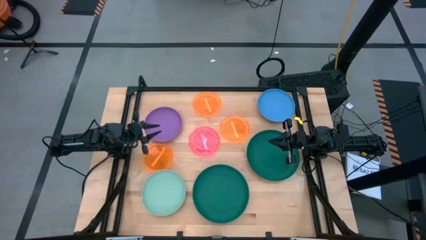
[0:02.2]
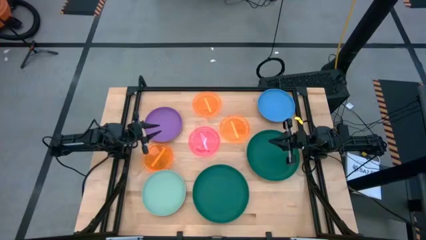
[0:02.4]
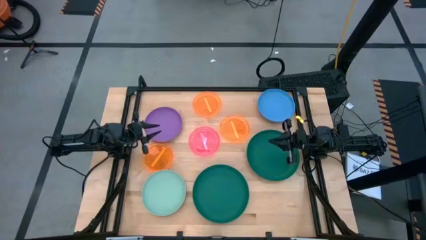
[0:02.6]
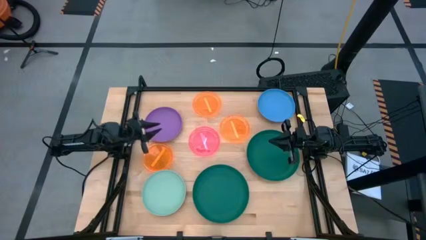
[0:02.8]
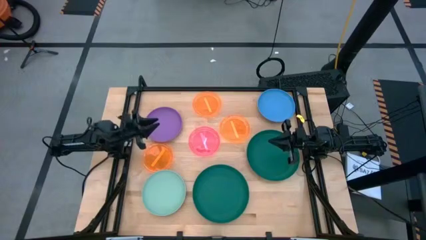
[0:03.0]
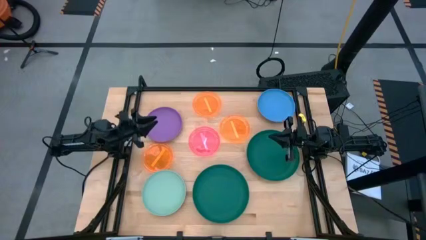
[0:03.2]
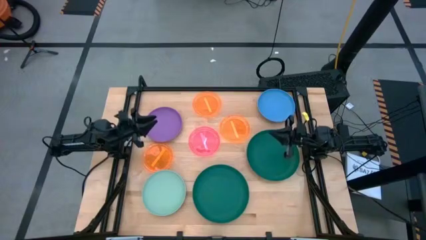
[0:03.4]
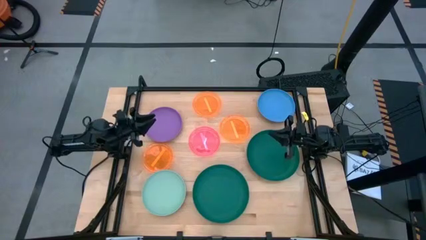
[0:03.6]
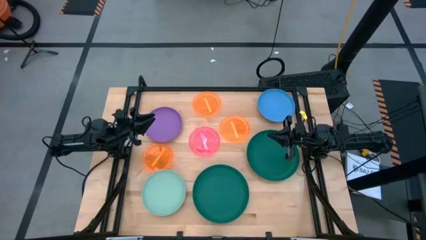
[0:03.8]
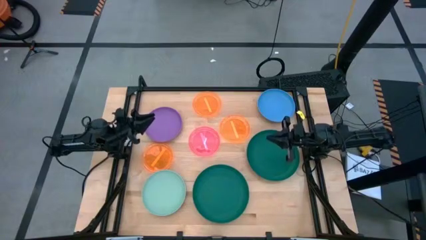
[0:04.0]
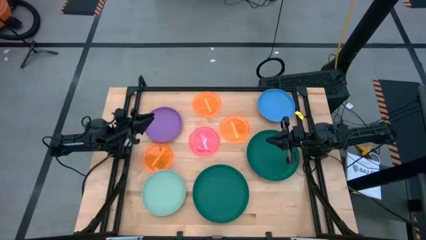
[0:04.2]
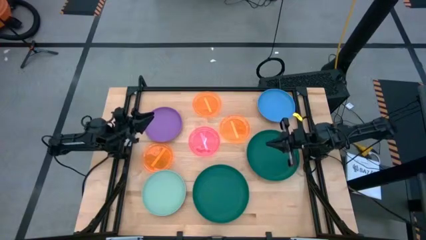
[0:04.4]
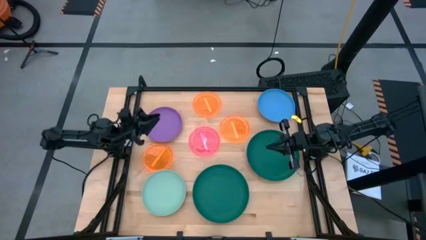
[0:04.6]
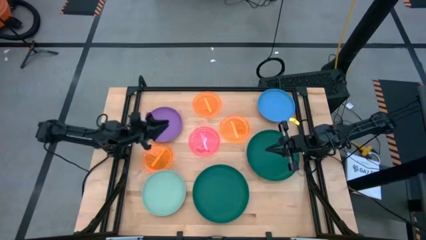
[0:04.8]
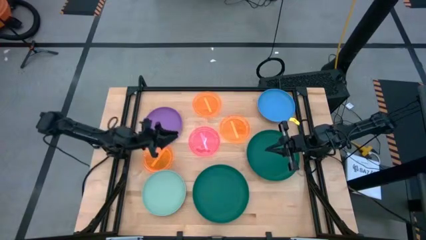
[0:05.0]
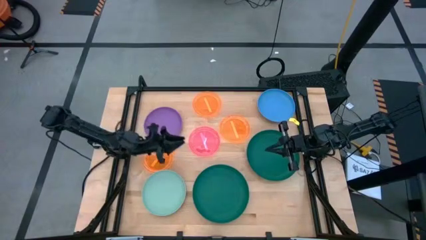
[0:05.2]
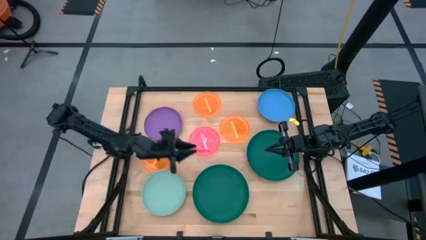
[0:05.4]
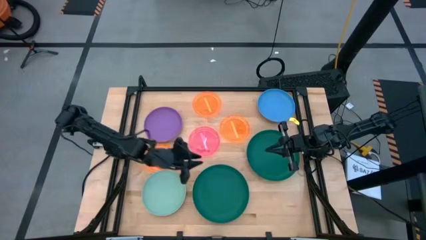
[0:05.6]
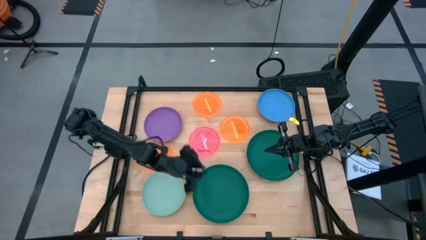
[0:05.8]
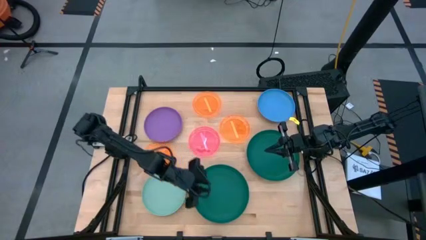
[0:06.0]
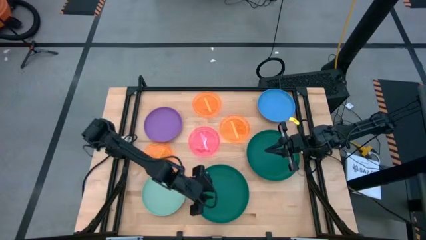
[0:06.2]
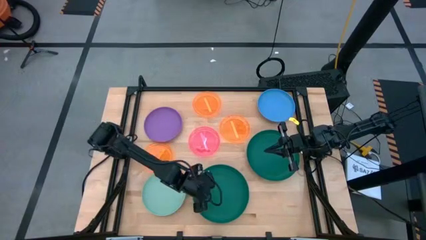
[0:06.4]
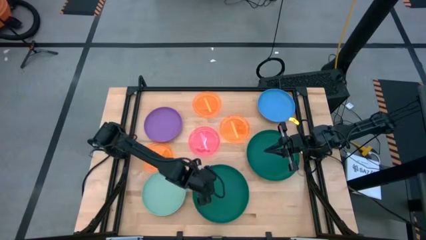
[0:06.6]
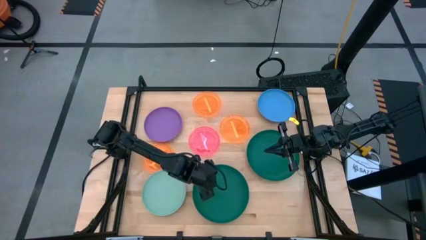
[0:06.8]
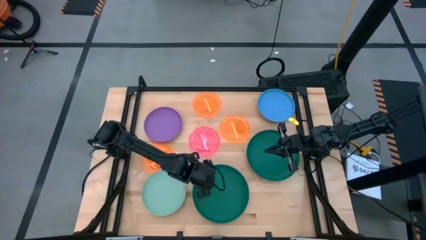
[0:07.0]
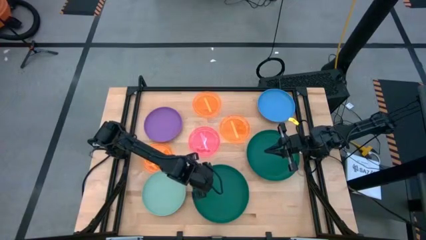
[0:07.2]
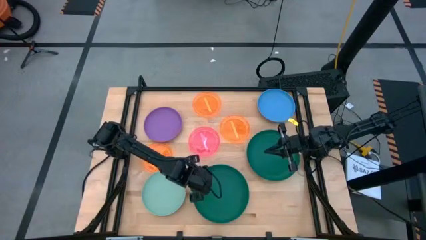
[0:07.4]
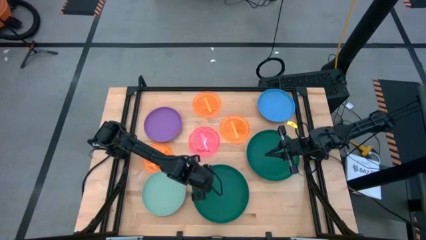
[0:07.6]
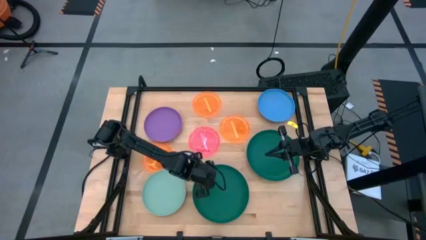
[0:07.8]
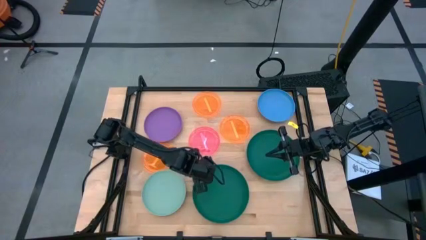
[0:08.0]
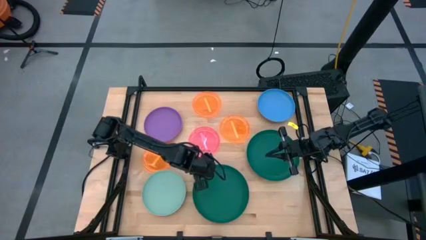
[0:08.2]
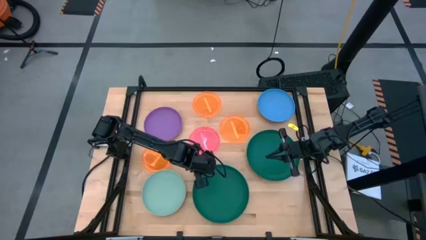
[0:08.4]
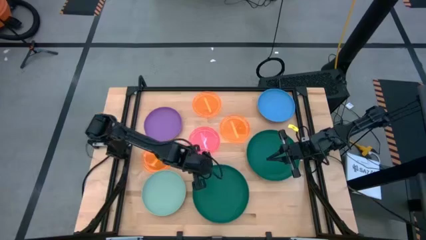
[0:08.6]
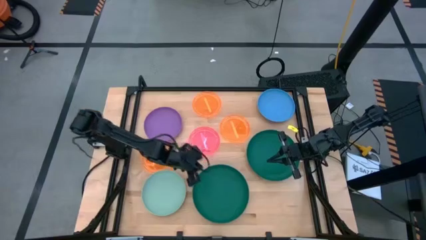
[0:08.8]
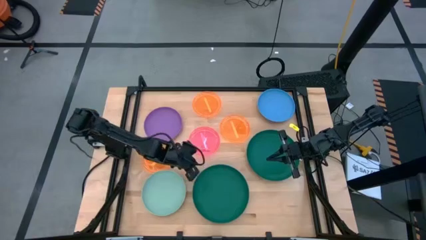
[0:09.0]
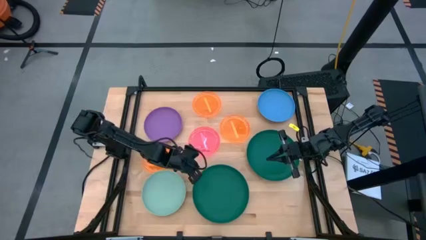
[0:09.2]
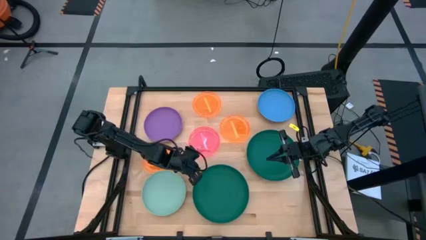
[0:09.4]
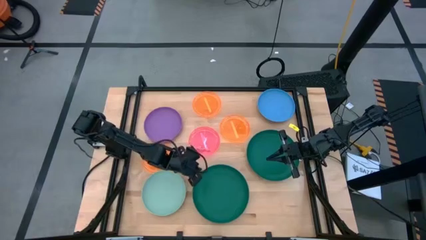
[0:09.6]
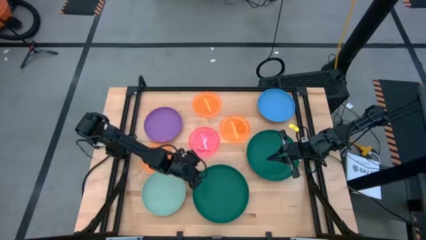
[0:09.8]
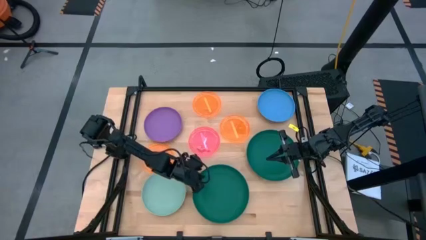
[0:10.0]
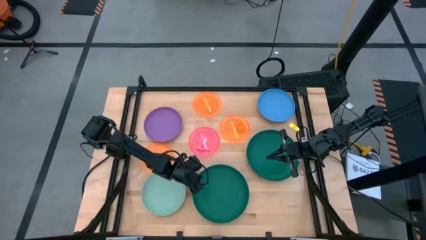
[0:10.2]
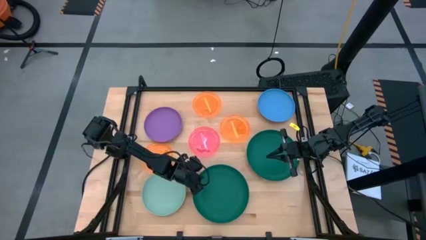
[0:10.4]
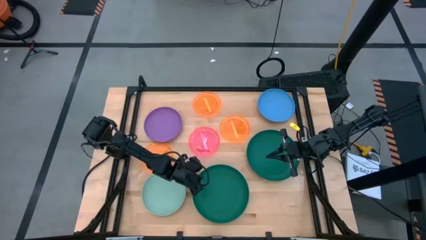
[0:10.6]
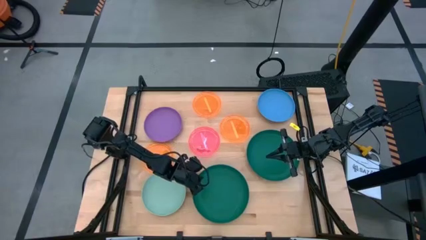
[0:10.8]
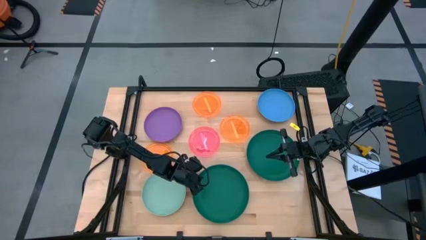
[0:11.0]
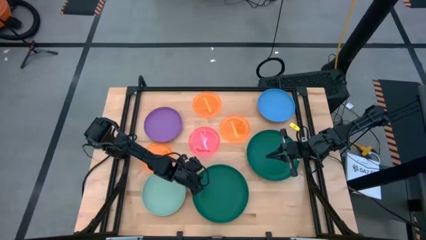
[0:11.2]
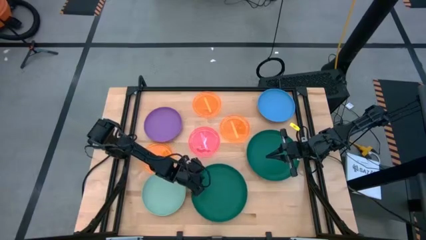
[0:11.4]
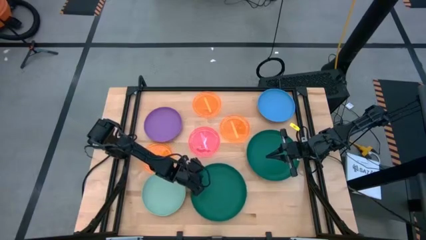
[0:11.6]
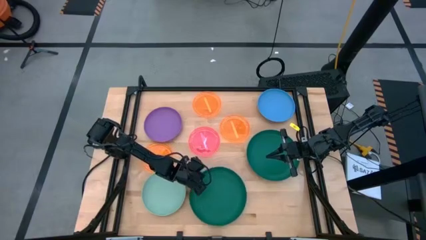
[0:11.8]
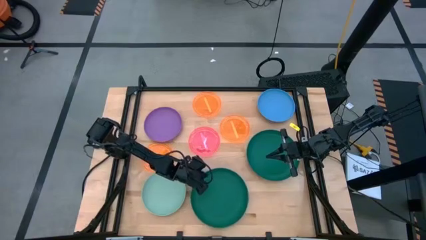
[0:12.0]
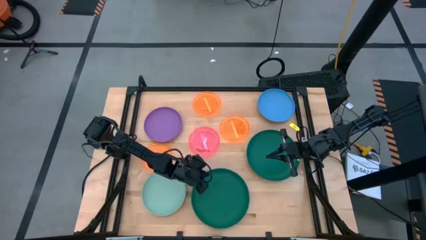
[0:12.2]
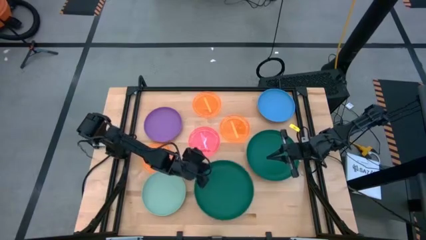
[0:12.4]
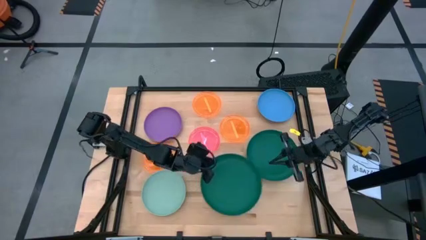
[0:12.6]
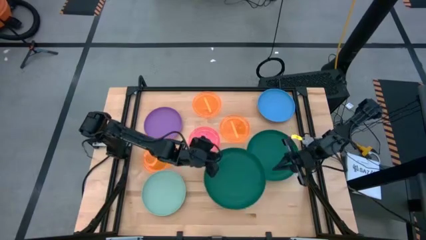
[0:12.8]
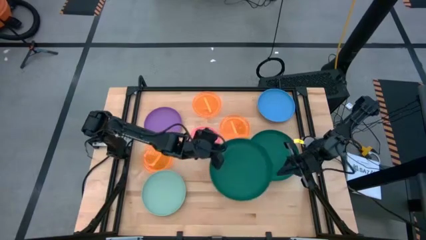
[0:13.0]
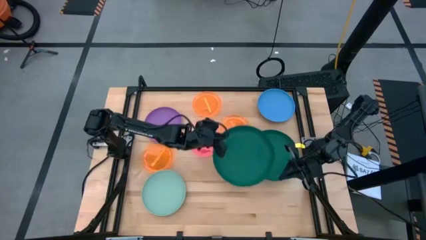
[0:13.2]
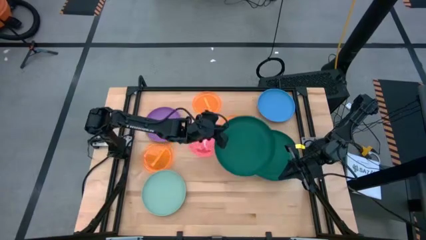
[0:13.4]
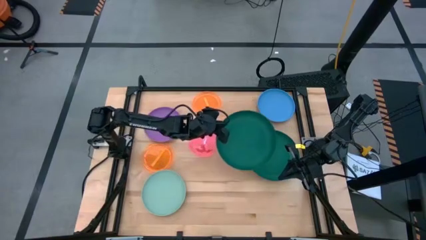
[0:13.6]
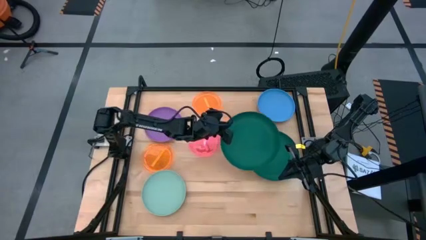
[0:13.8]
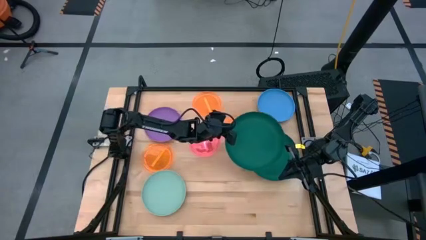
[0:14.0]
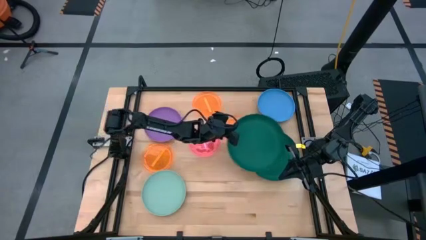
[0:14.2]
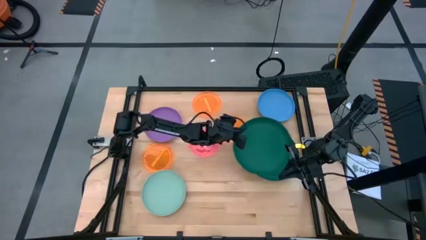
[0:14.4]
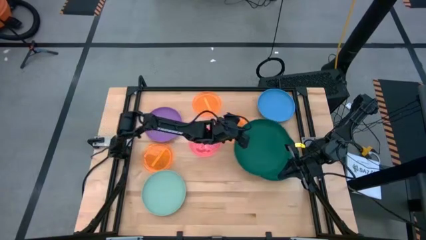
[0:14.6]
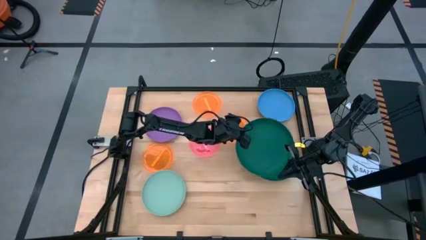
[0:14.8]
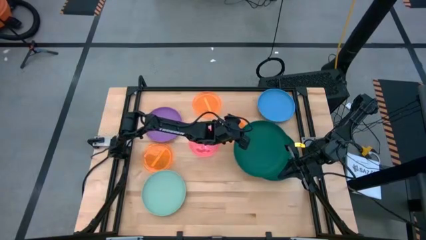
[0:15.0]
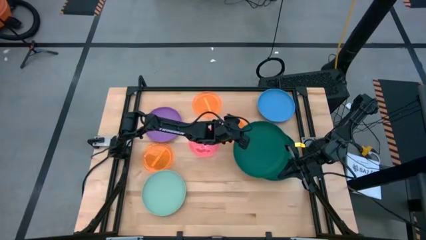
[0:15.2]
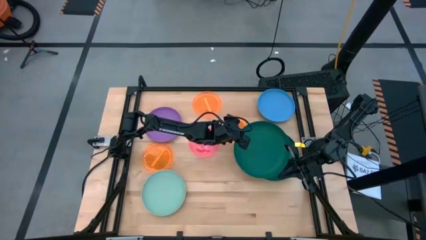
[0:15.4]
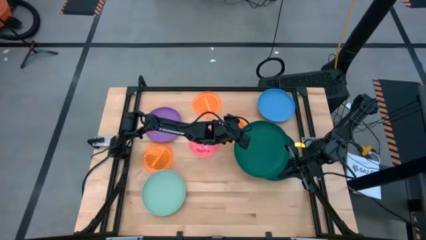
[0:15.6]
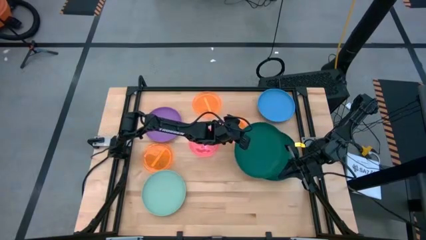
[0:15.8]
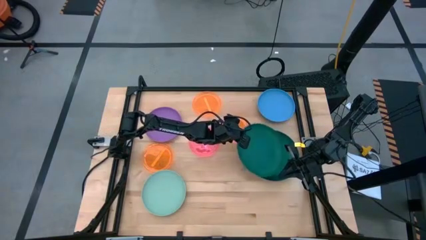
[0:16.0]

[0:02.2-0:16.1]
Task: Stack plastic plates
Stack the left green plate on top of the green plate

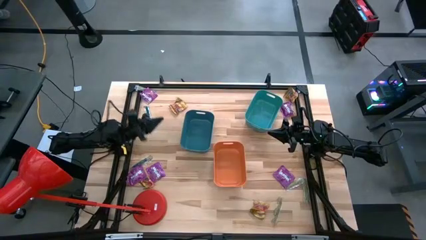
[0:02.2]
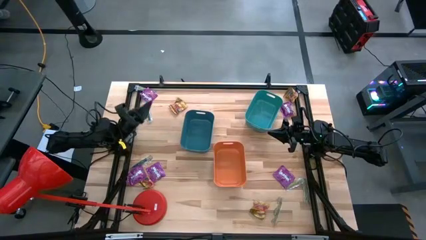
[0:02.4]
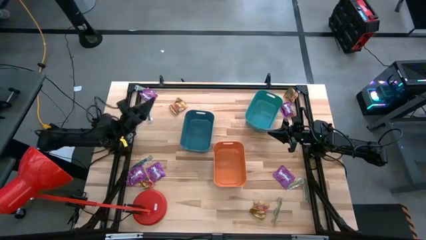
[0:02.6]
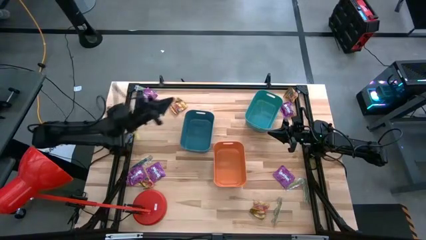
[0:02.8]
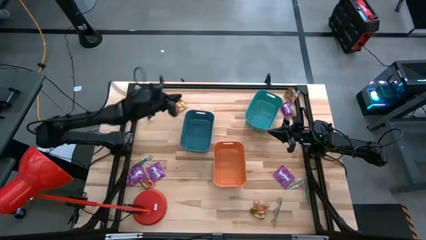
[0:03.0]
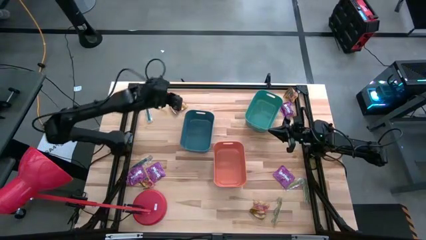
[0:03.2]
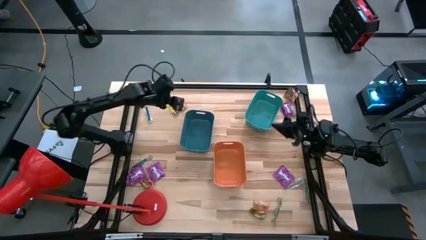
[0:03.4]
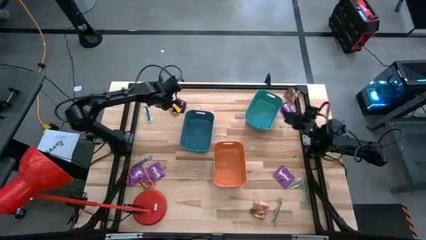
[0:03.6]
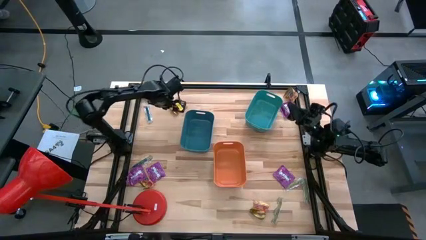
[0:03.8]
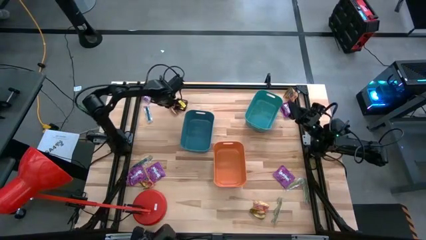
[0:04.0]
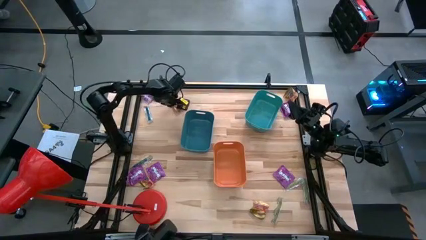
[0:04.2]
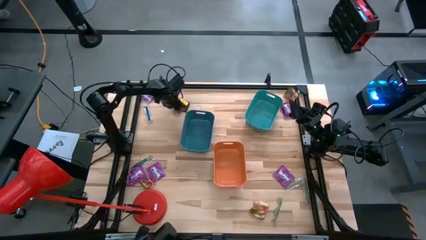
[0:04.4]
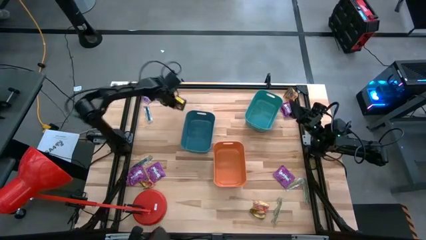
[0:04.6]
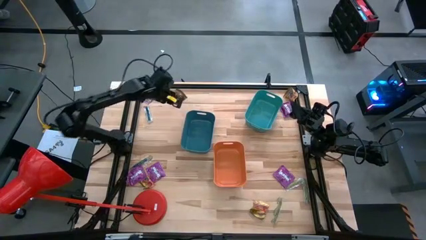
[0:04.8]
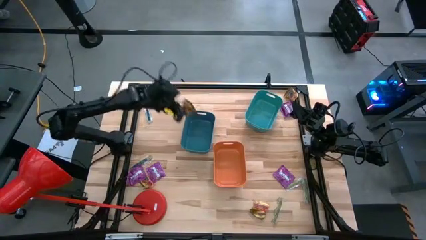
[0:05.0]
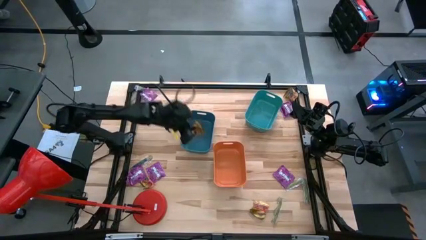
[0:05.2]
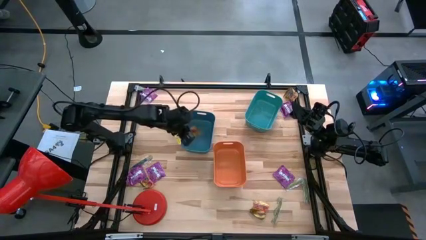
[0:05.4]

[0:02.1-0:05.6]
Task: Sort candy
Put the yellow candy into the blue bin
